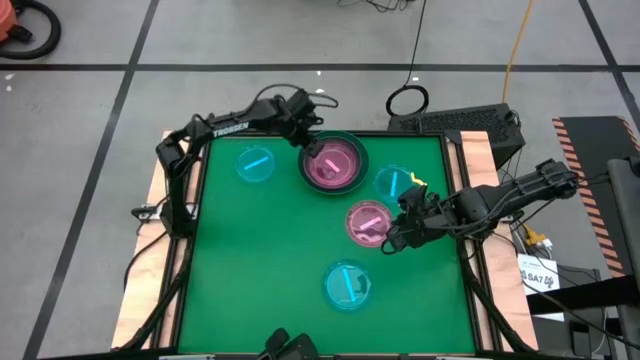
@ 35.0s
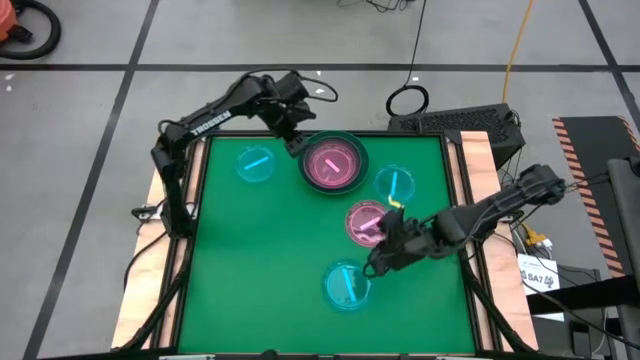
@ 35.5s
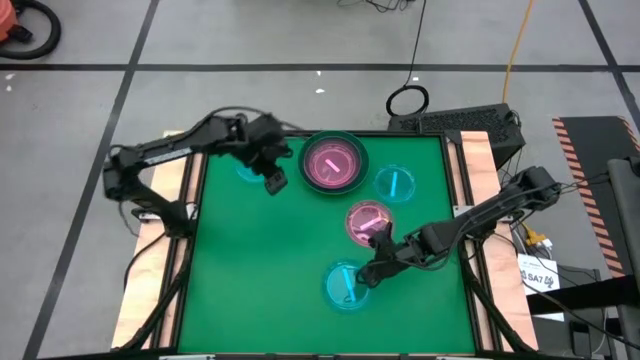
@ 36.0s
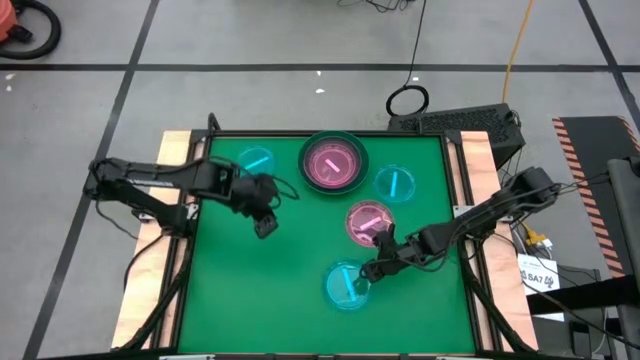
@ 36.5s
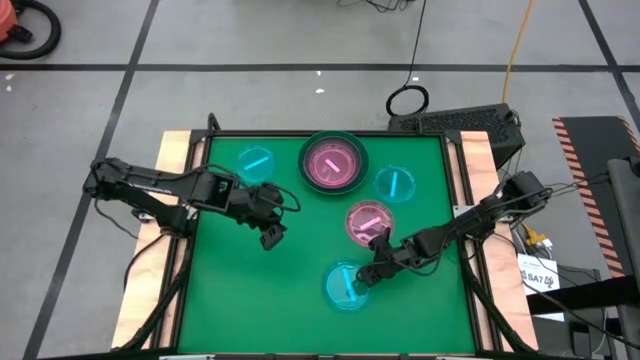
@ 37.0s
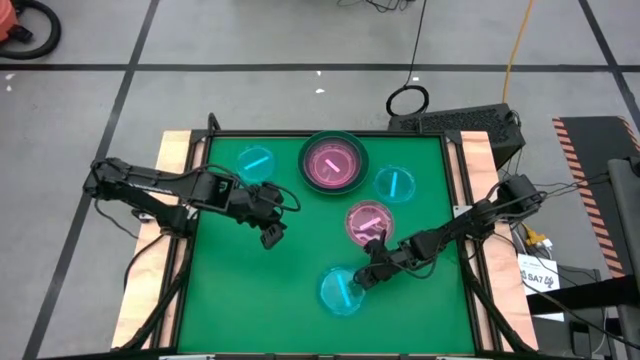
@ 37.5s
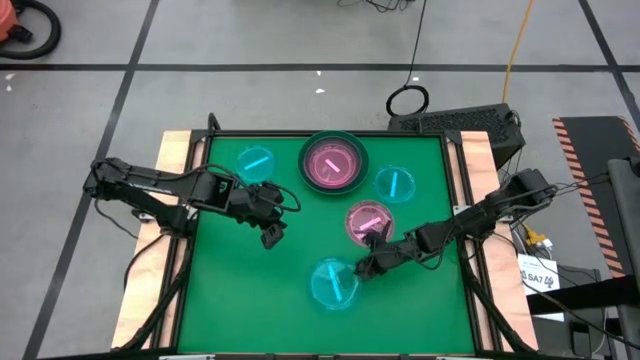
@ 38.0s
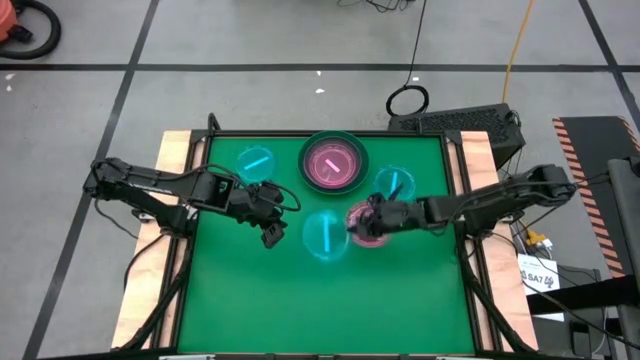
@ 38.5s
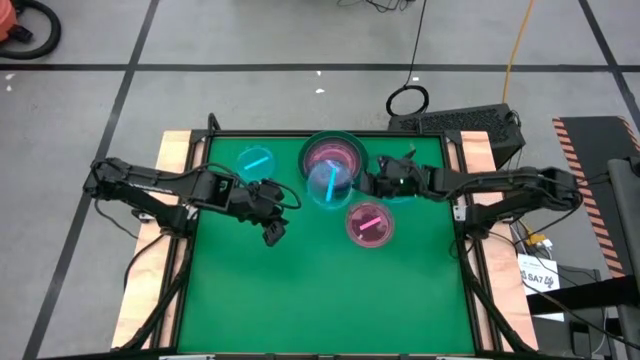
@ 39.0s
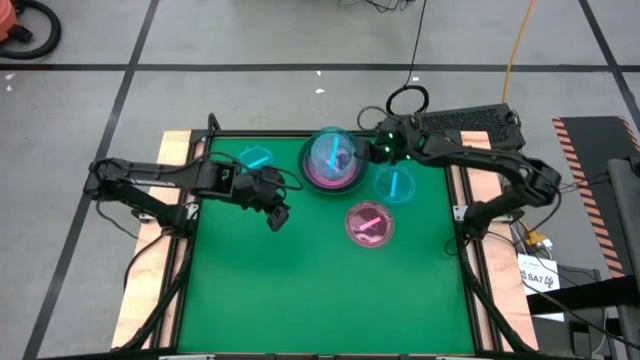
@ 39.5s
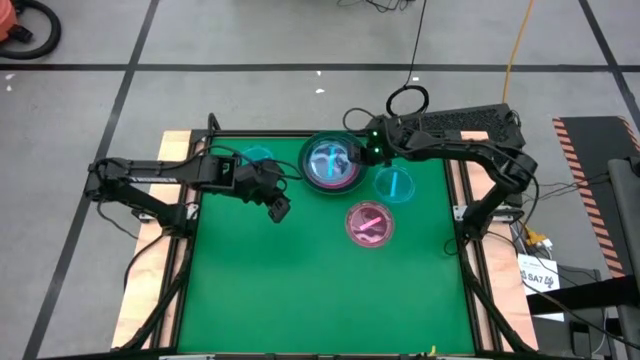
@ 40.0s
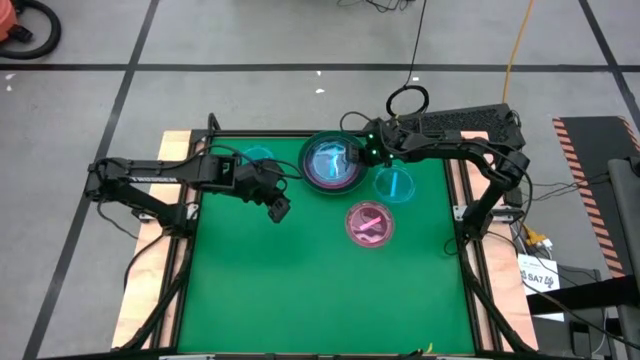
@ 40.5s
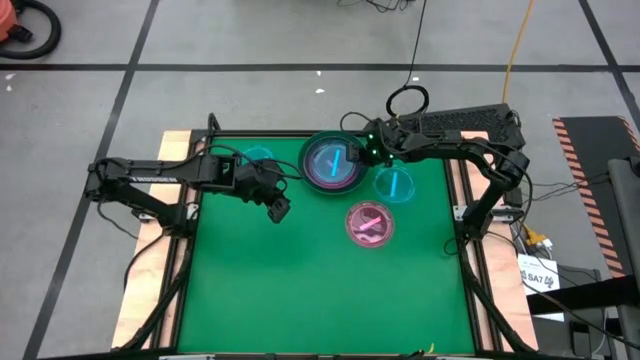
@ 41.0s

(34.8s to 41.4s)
Task: Stack plastic plates
Stack the bottom blue plate on top of the pink plate

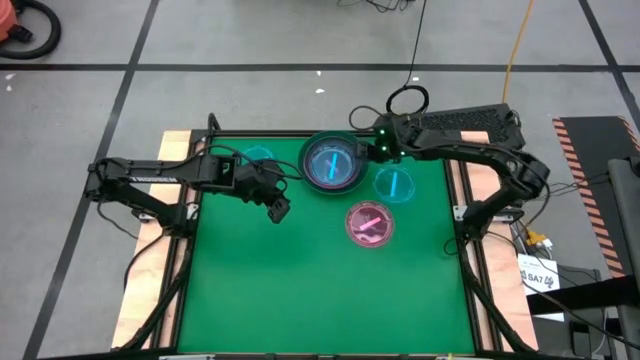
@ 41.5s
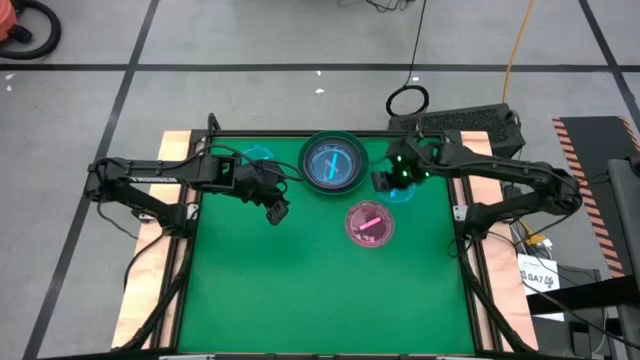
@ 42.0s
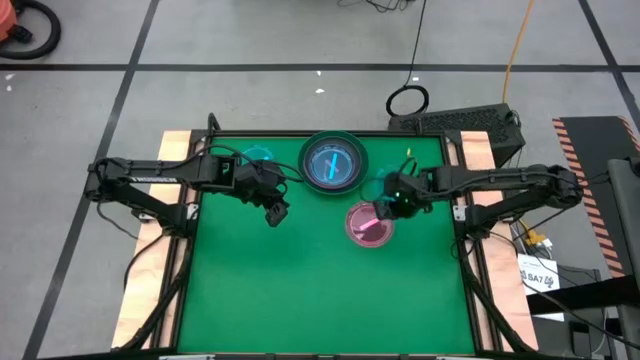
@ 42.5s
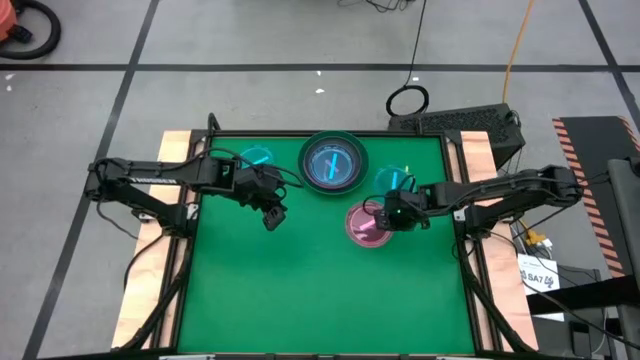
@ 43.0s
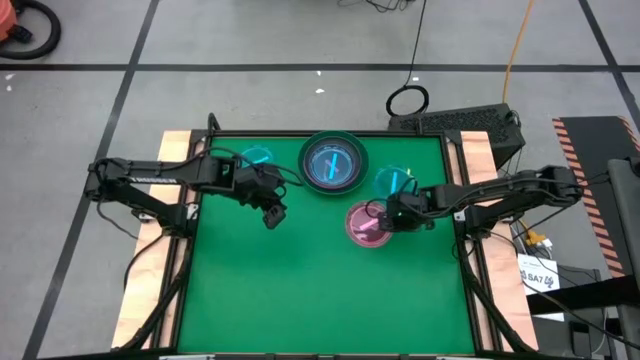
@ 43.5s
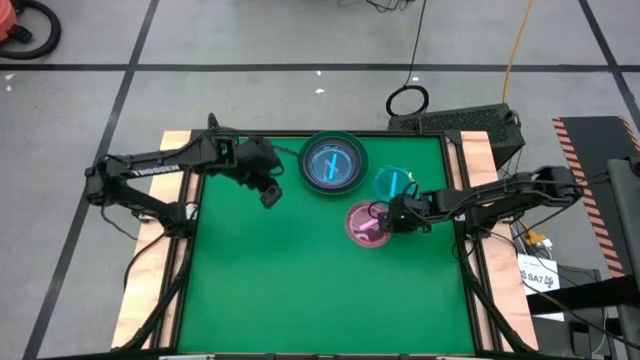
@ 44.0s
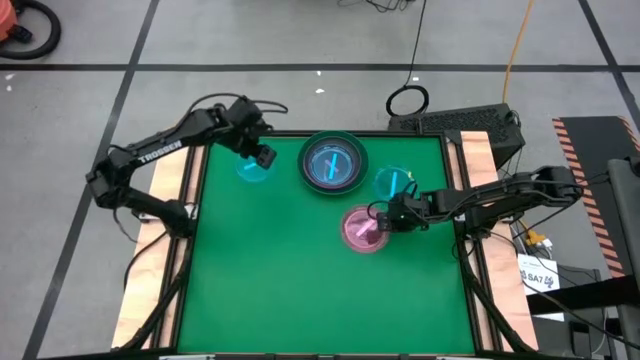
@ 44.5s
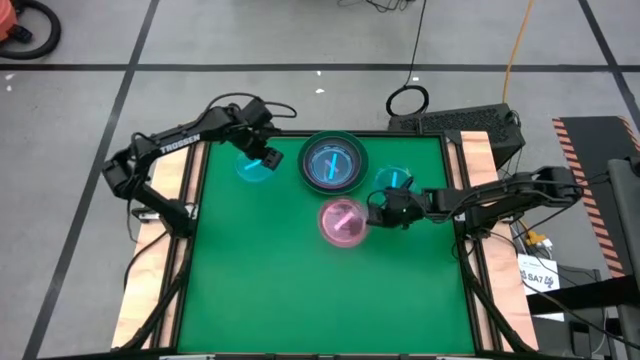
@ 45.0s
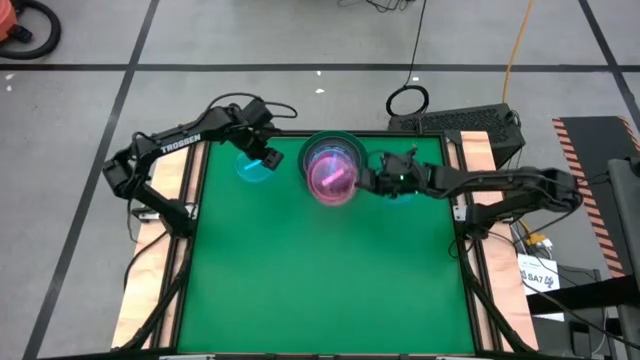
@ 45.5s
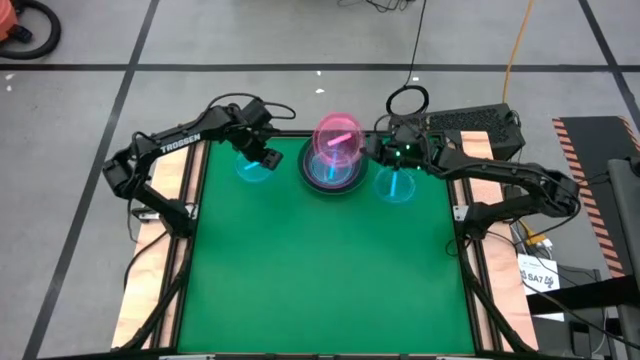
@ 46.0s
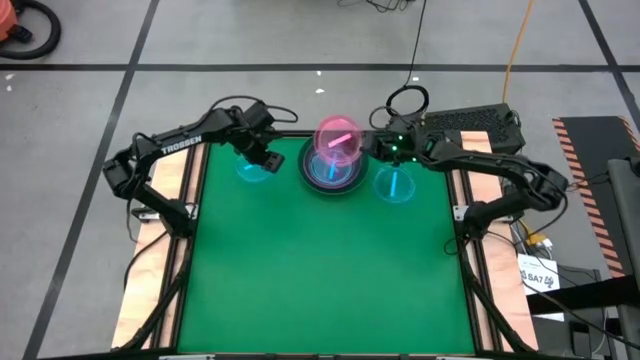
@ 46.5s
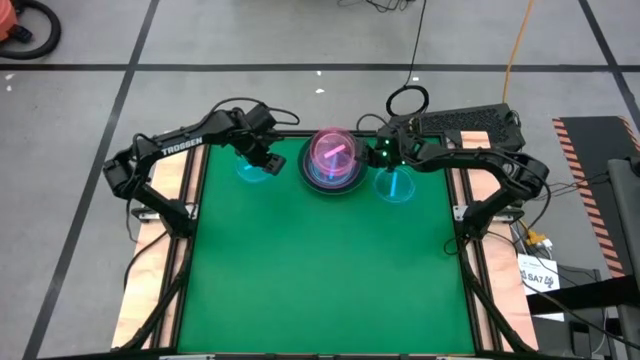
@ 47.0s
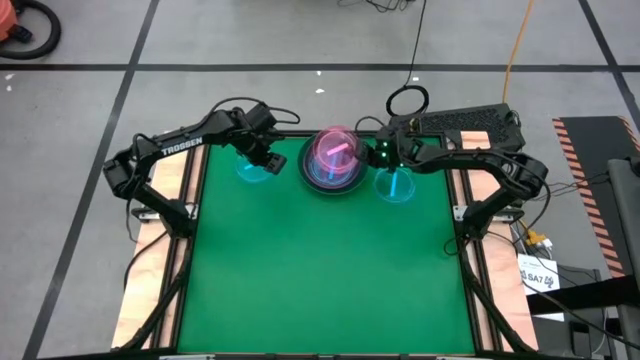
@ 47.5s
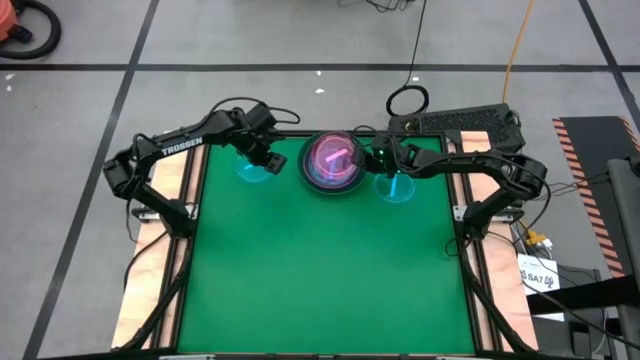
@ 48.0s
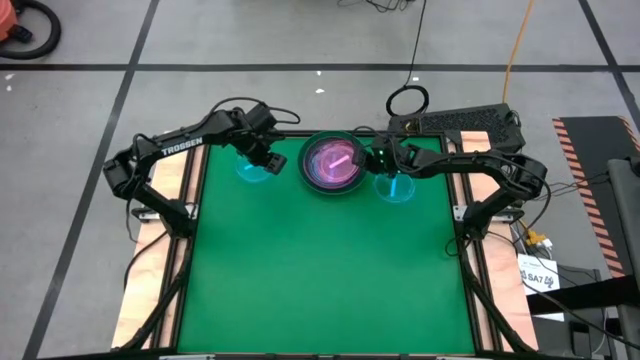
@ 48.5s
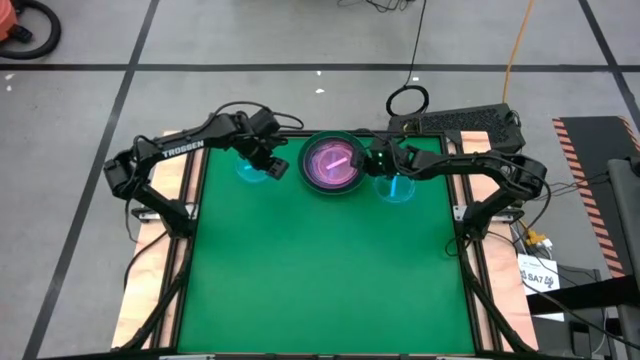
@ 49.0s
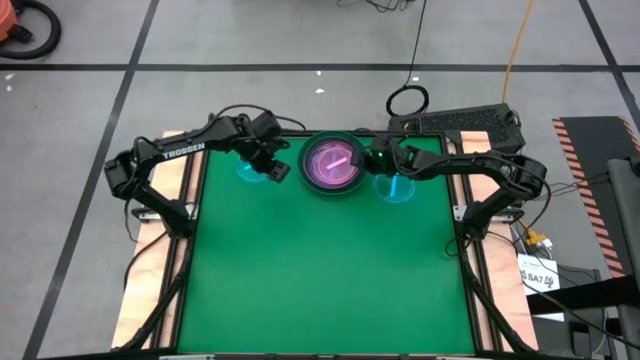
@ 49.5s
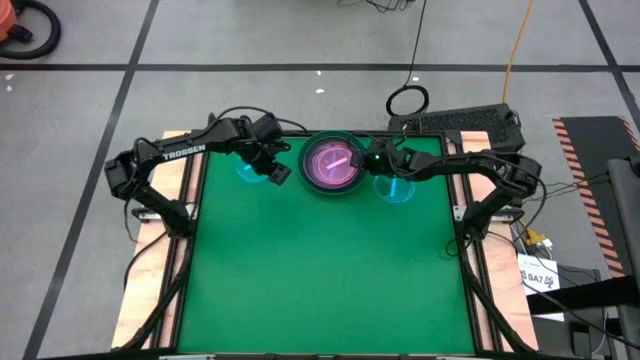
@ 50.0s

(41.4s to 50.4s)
Stack the pink plate on top of the blue plate

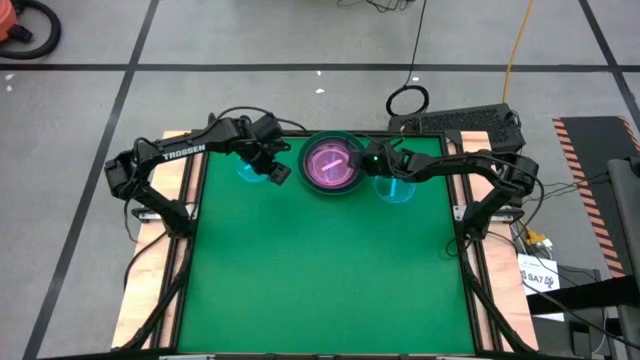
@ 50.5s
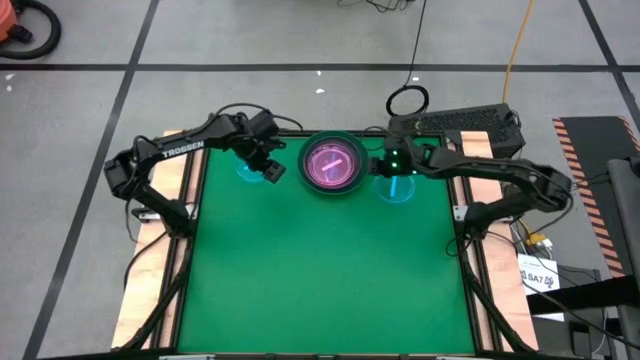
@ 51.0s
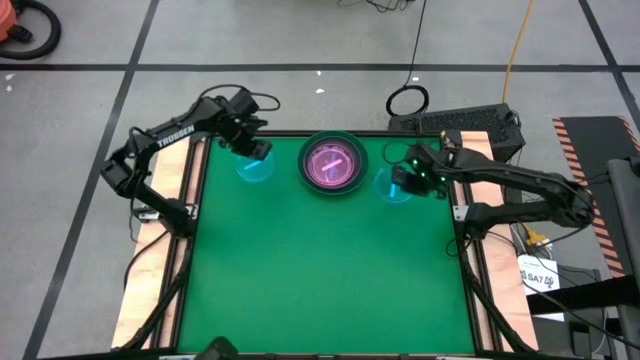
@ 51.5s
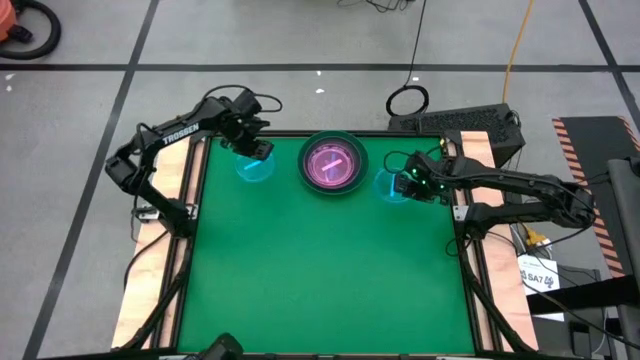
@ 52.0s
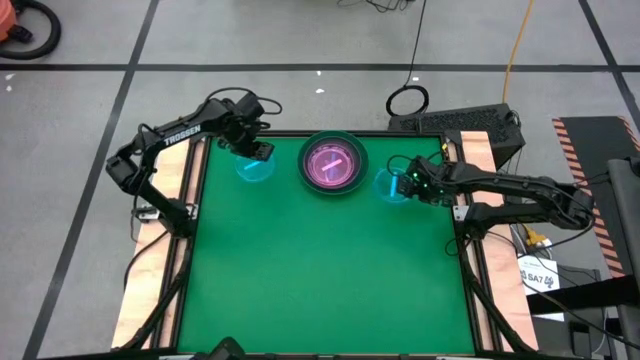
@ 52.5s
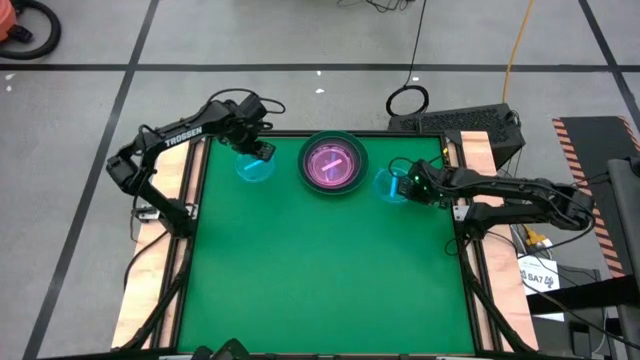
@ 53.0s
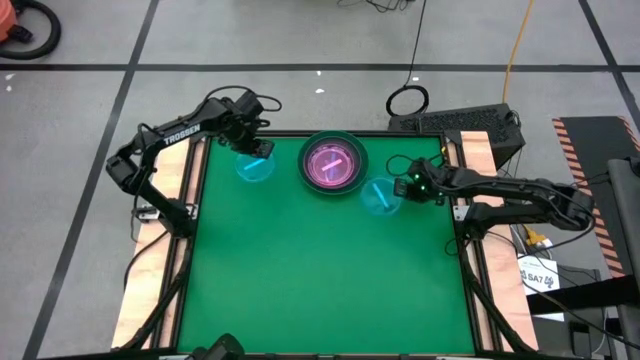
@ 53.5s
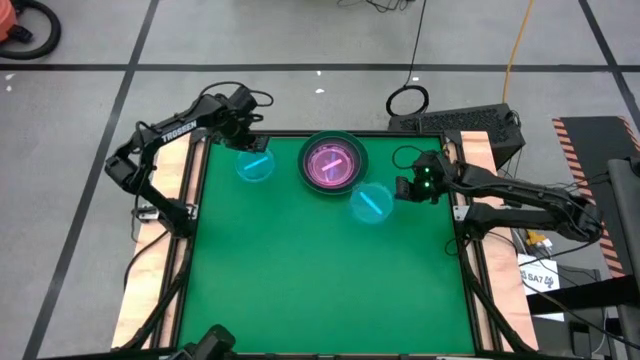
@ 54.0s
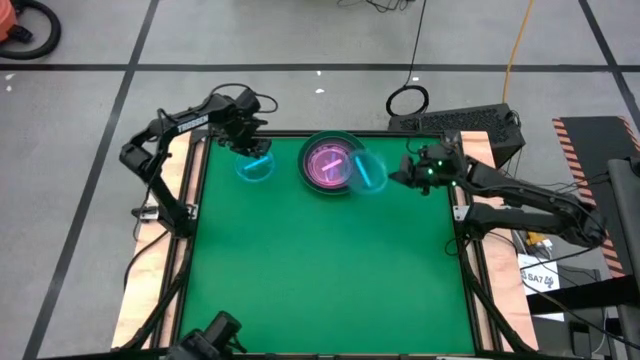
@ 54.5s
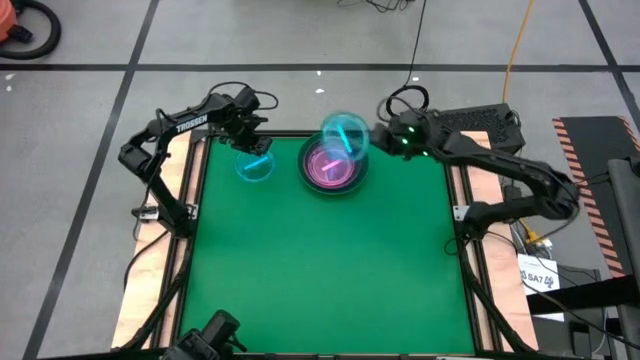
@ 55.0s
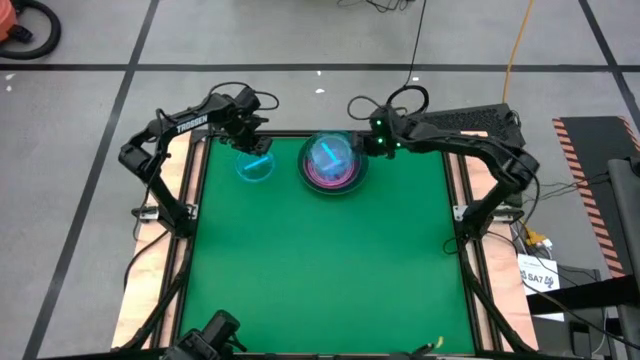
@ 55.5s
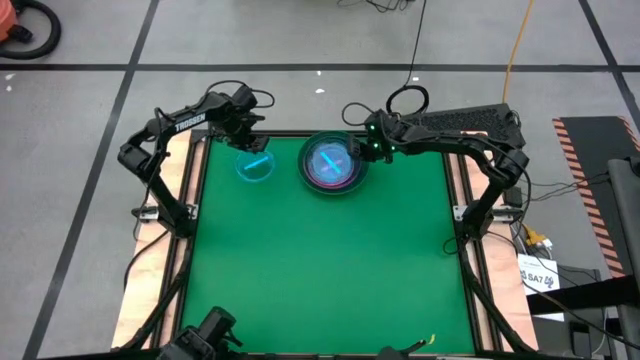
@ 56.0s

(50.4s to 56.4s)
Stack the right blue plate on top of the pink plate

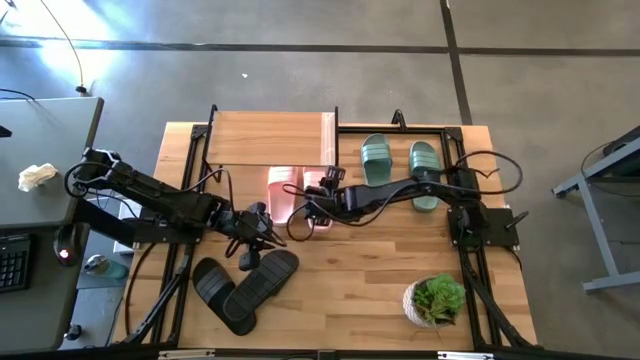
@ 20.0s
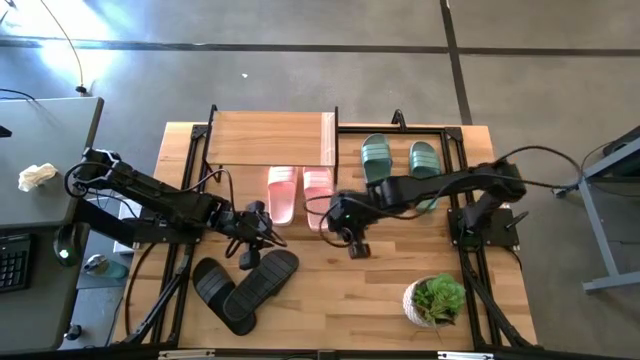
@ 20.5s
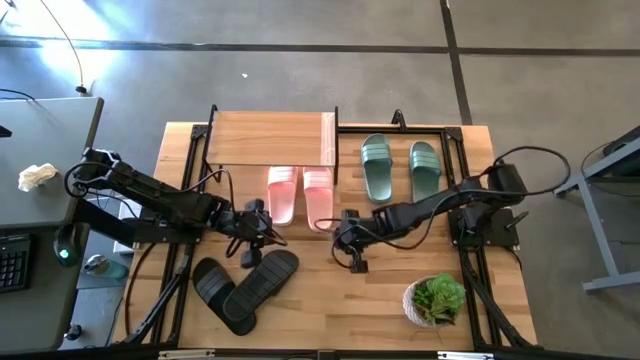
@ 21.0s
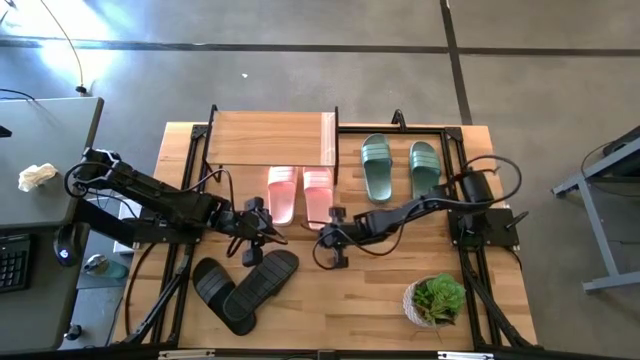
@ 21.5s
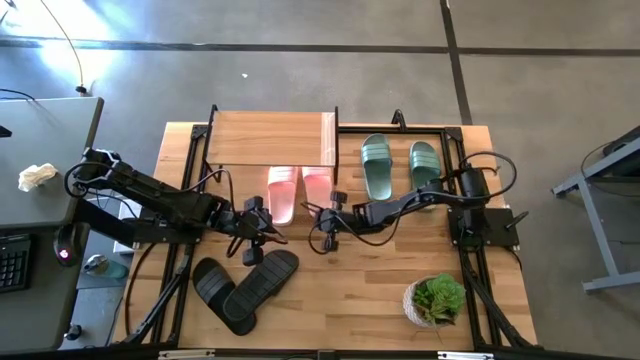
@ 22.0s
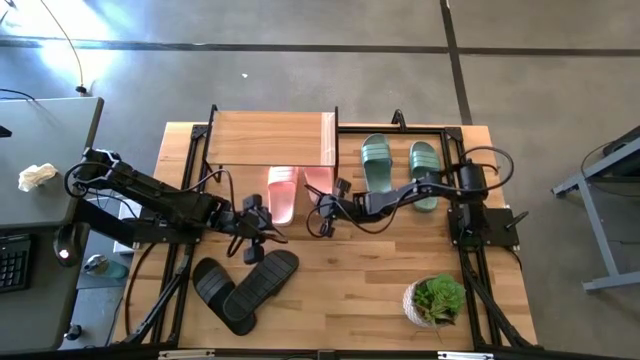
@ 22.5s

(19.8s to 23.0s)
Task: Pick and place slides into the shelf
Adjust the right pink slipper under the shelf
